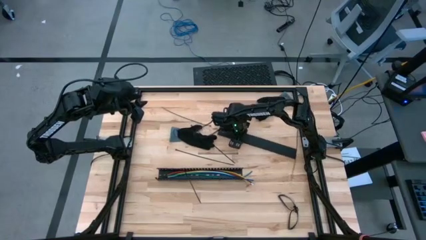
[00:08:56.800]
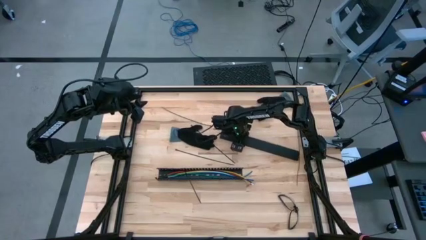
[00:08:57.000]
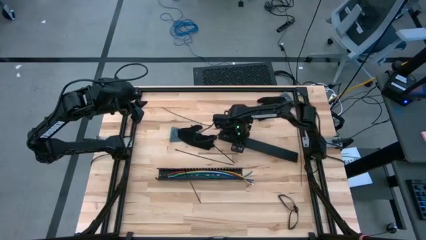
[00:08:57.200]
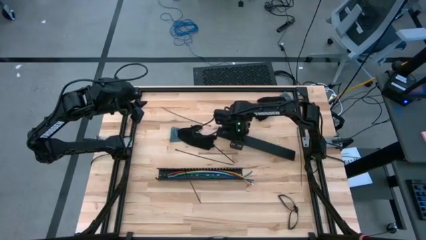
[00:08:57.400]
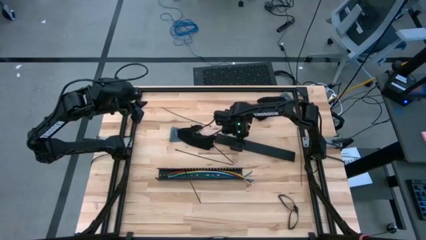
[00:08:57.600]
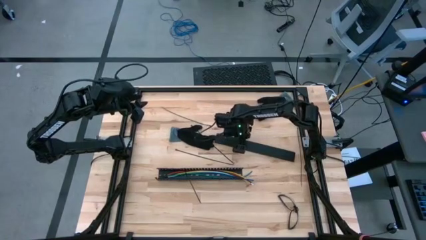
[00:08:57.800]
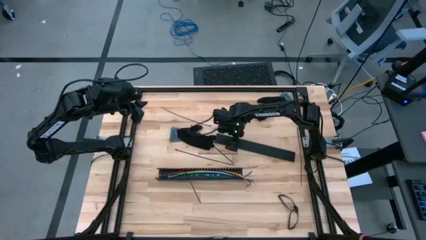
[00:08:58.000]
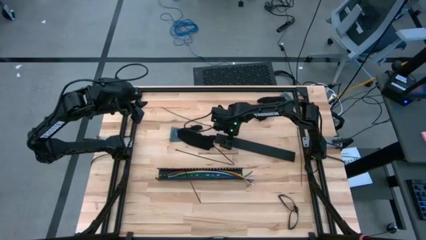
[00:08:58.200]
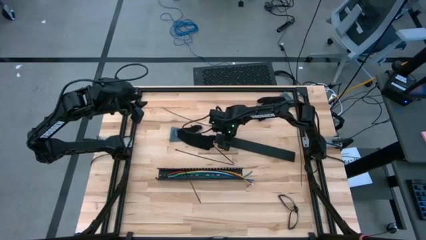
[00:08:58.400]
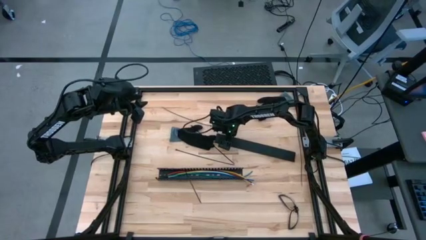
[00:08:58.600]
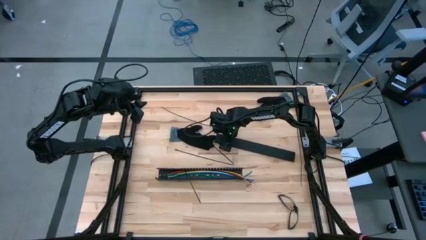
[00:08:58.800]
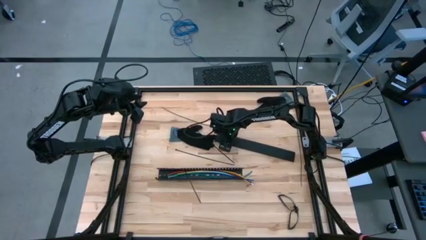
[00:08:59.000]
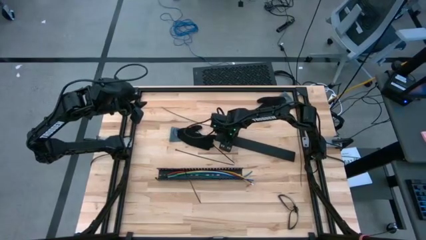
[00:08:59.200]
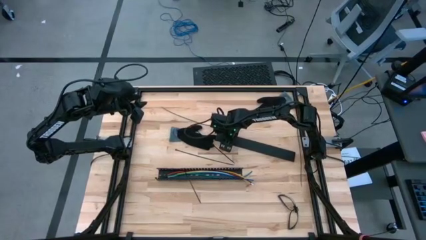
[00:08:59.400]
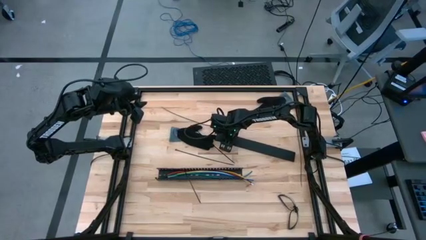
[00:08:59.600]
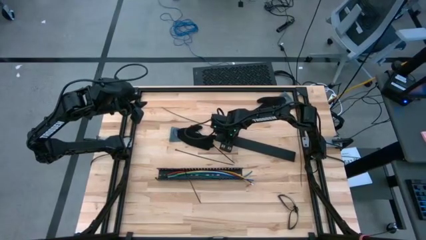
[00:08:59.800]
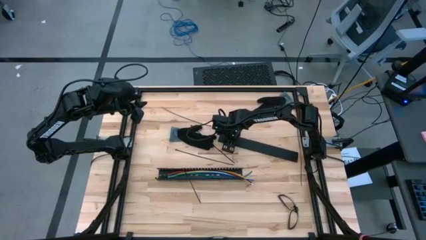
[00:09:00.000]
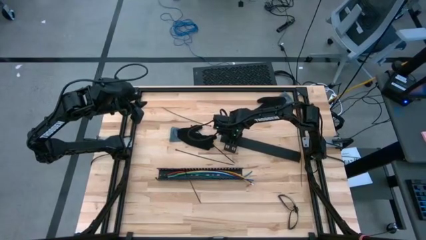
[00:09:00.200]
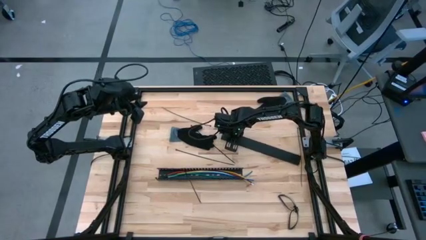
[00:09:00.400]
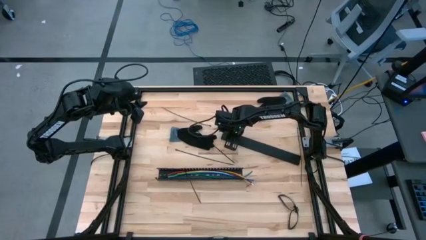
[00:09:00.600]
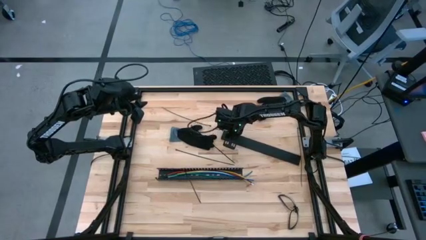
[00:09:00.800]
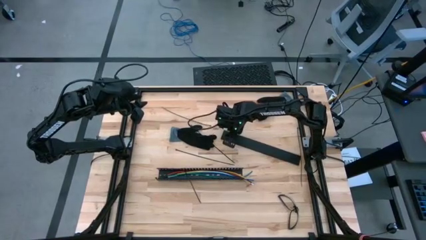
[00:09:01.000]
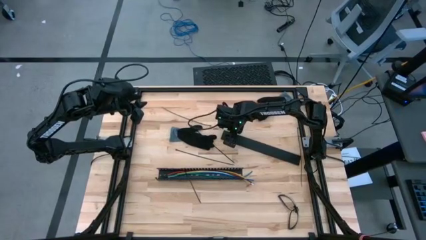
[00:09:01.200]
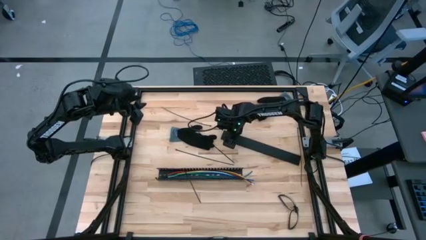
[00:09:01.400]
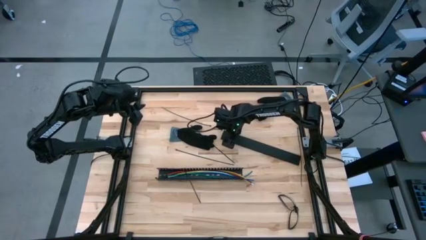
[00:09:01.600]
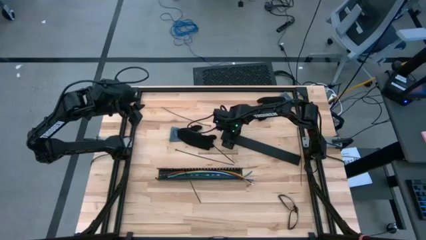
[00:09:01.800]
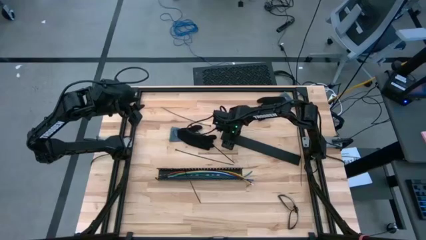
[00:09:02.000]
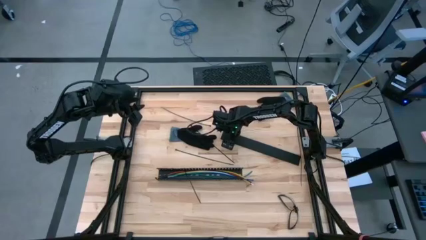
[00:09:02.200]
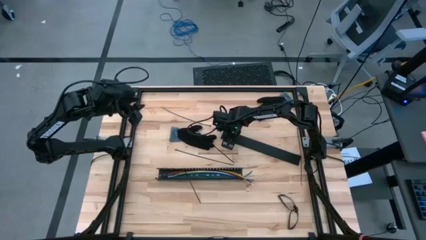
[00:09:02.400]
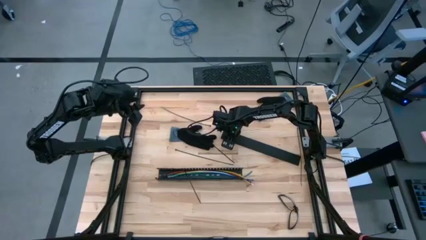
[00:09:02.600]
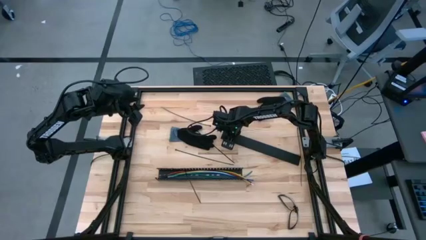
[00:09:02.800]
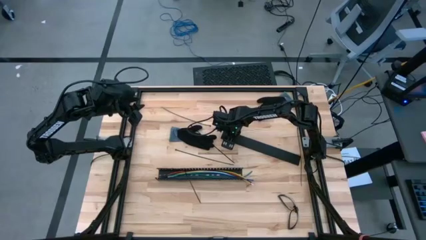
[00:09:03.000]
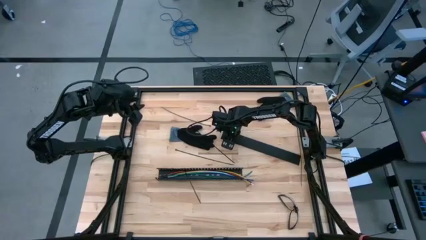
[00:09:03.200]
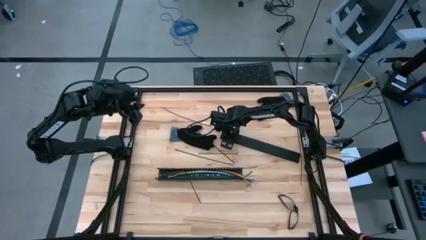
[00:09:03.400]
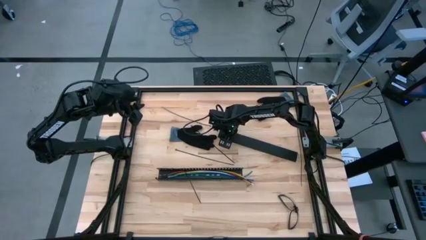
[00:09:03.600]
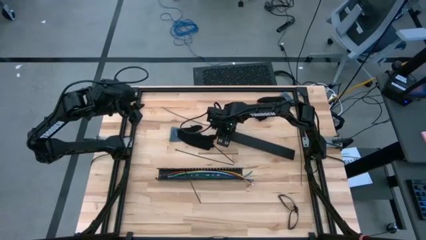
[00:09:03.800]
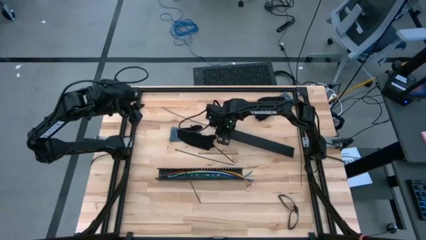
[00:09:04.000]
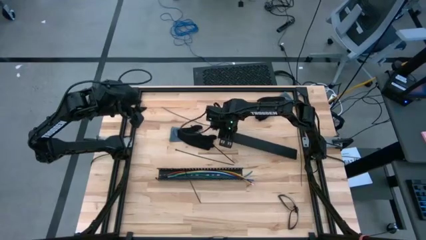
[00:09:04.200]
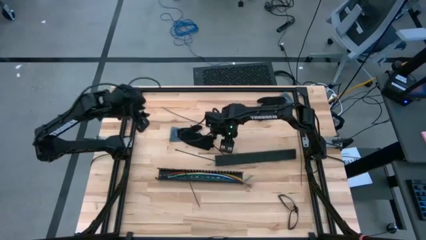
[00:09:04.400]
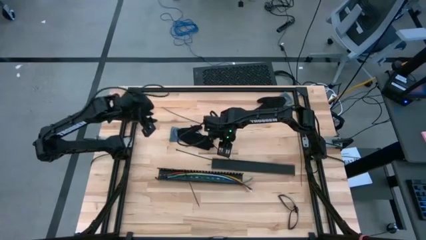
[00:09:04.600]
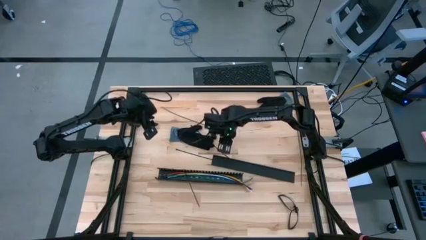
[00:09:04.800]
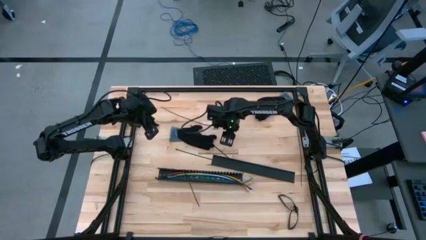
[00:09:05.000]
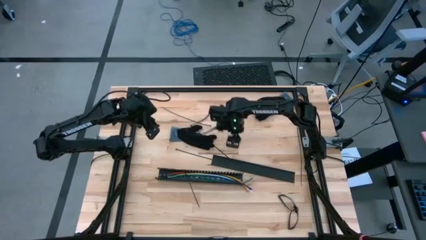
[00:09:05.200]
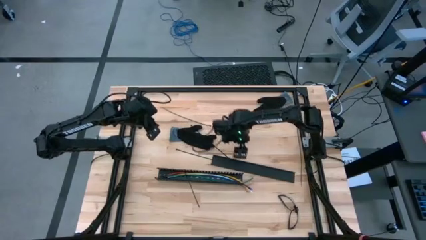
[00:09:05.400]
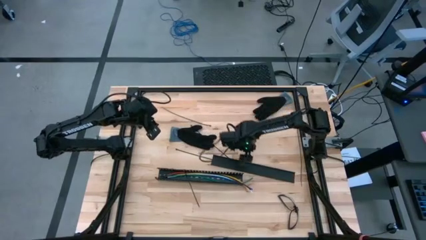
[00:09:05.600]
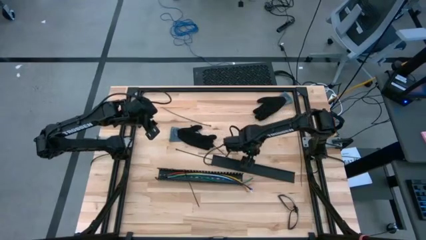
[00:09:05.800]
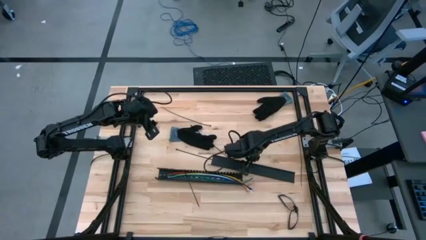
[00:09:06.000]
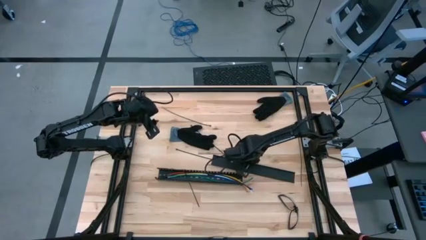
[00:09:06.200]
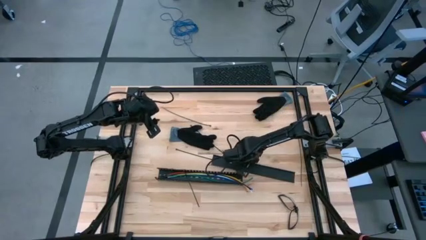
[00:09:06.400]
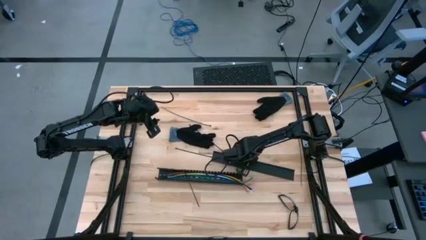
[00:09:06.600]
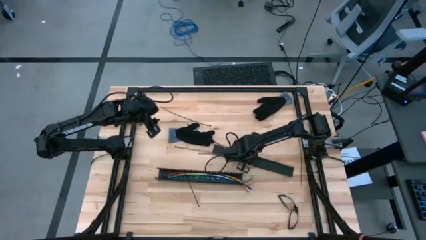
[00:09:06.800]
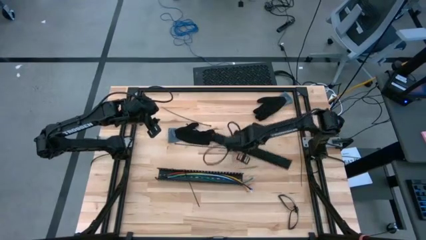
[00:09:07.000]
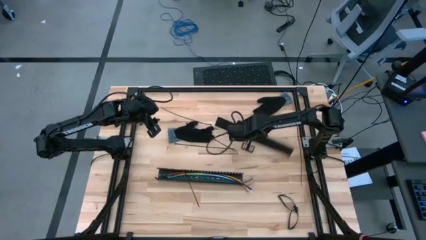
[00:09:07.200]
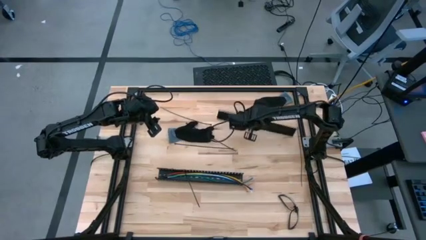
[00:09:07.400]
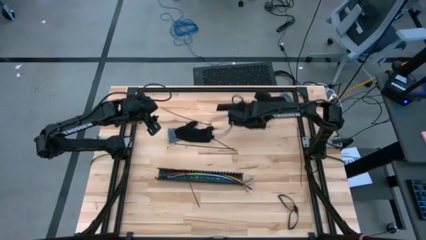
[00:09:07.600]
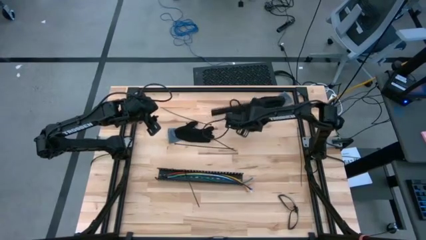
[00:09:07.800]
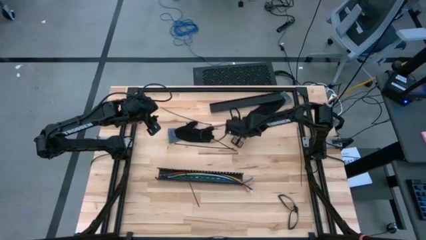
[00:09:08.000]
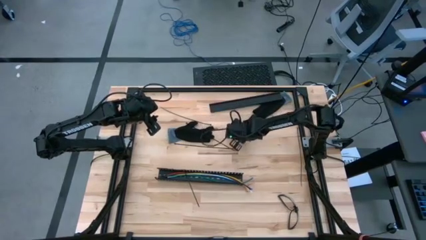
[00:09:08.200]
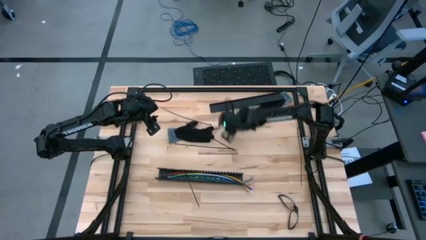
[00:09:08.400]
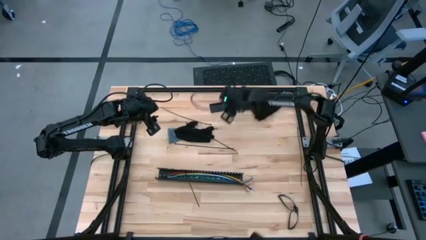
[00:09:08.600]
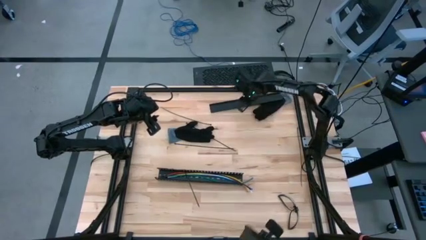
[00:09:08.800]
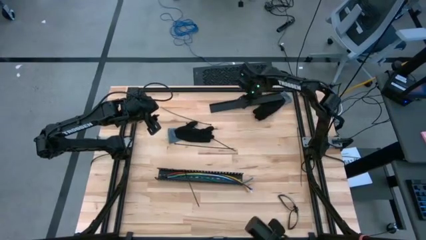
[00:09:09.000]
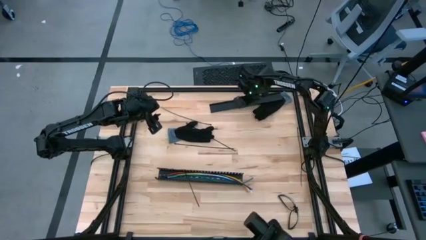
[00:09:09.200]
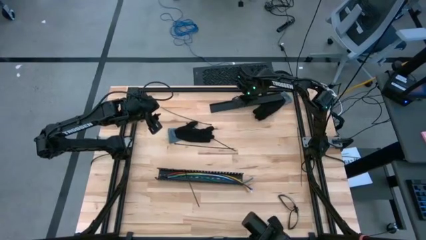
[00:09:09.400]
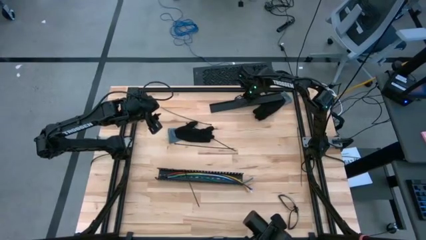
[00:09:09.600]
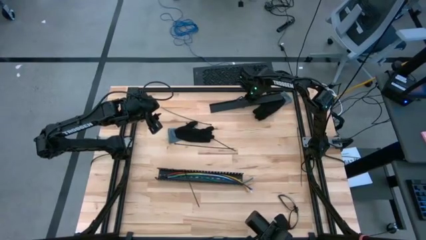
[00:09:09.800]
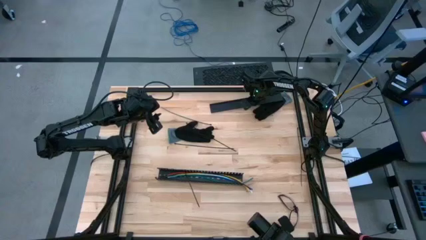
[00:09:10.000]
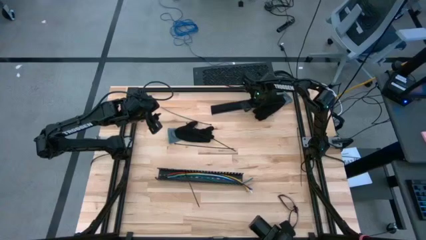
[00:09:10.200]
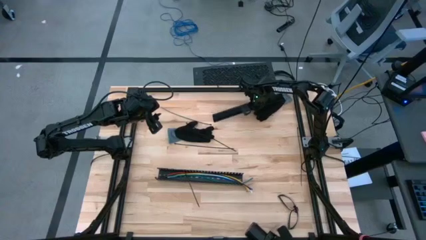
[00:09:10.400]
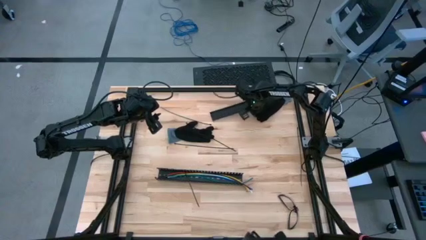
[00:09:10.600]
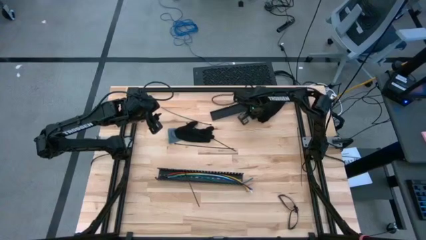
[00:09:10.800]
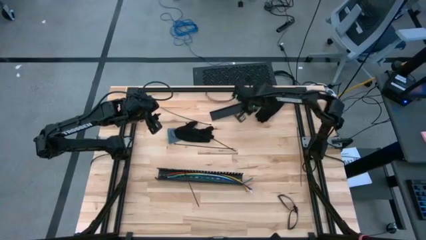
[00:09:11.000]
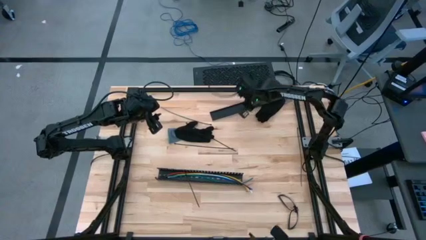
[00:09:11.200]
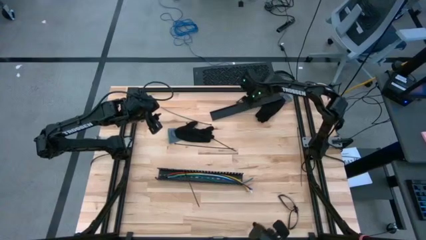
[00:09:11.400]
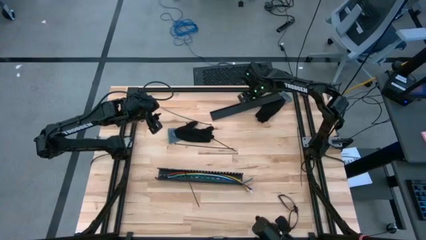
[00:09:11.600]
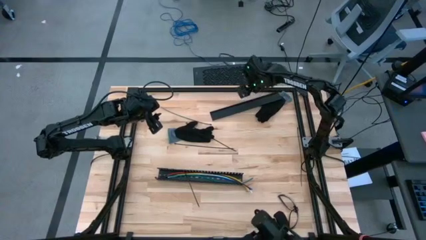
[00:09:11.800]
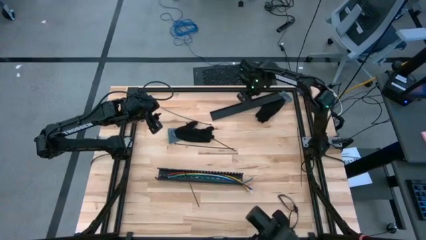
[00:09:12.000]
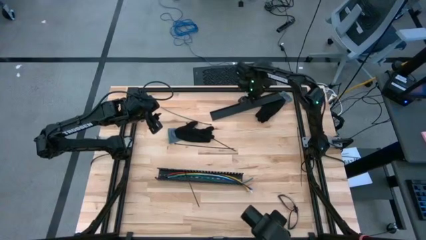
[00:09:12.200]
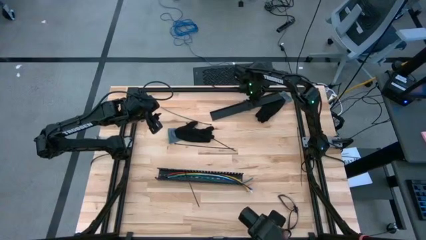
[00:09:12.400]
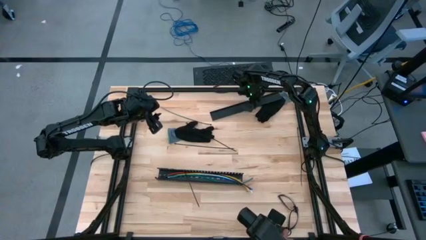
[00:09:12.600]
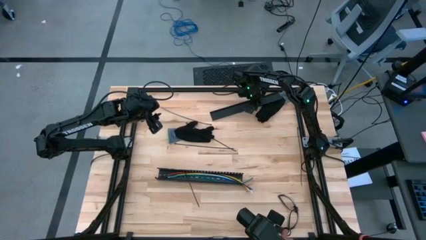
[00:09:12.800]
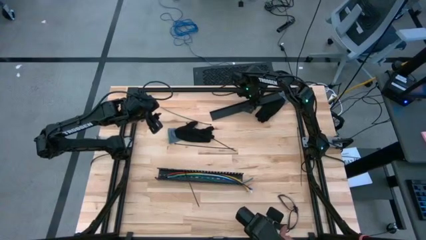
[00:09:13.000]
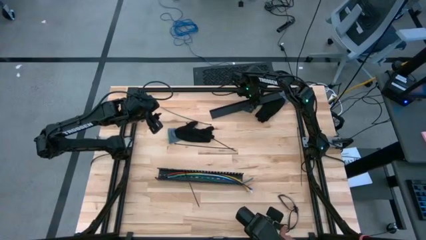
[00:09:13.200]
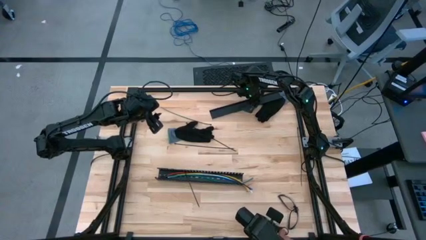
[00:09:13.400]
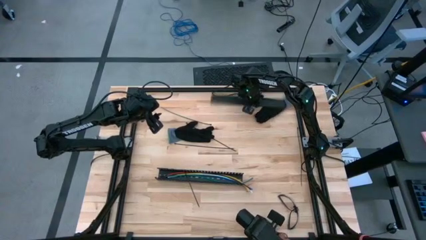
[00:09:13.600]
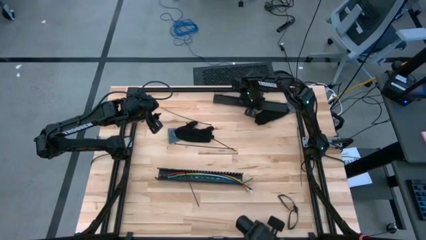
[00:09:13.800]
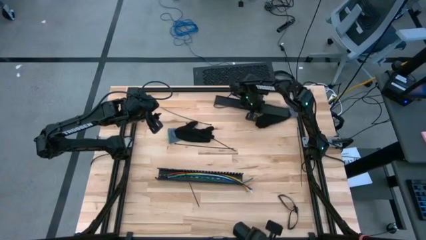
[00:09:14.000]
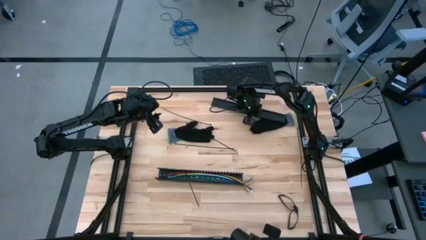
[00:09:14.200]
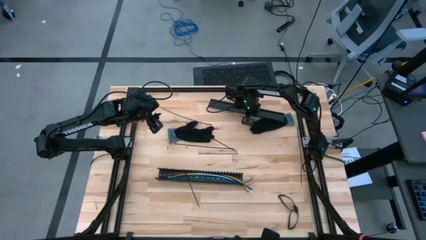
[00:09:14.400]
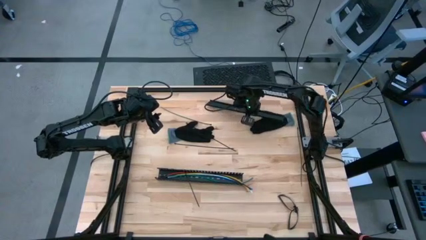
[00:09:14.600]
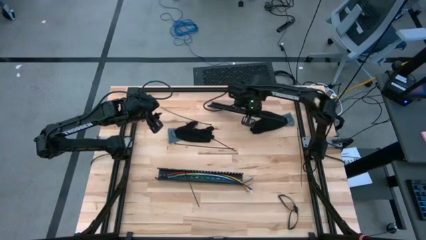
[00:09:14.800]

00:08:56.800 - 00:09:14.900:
Task: Ziptie cables
Close the cable duct
